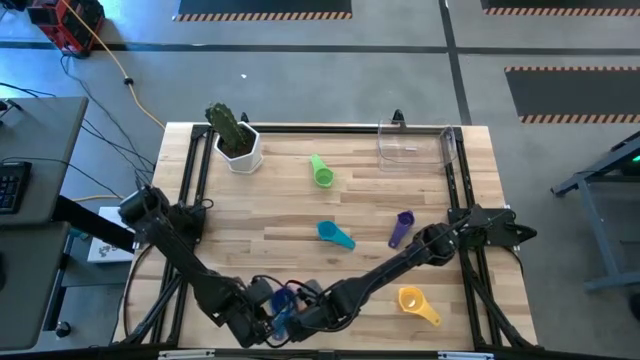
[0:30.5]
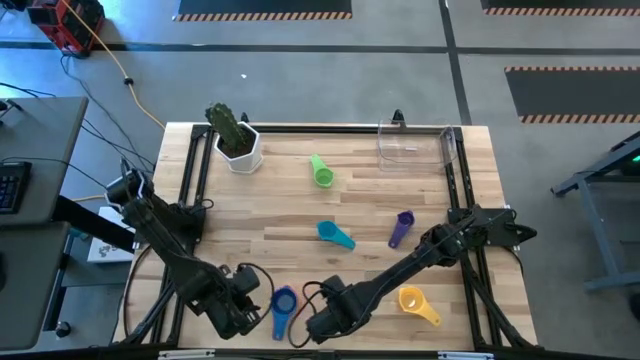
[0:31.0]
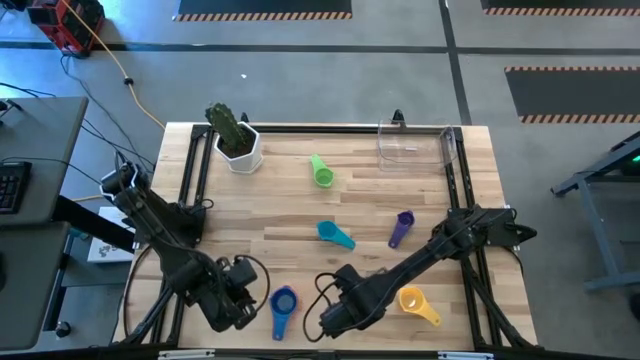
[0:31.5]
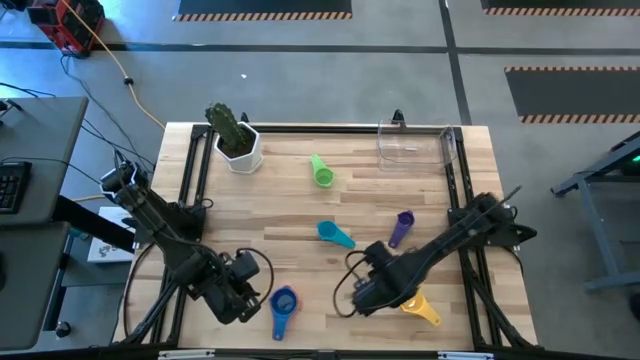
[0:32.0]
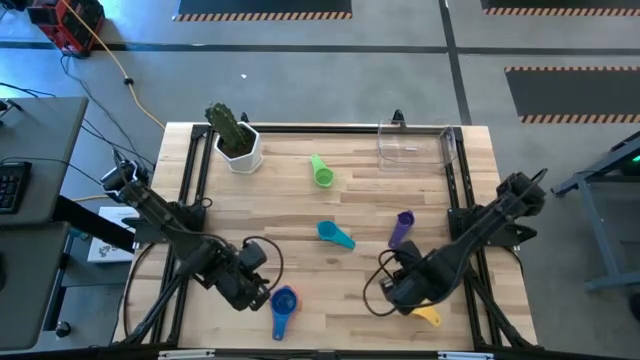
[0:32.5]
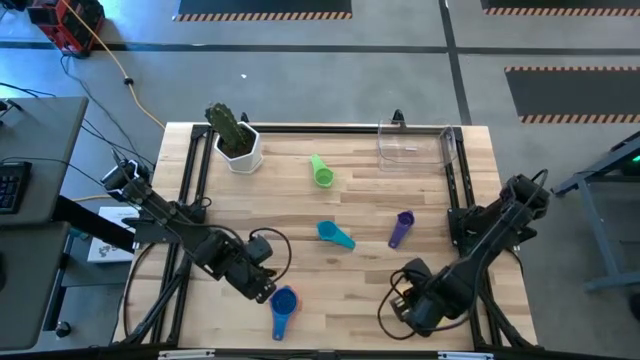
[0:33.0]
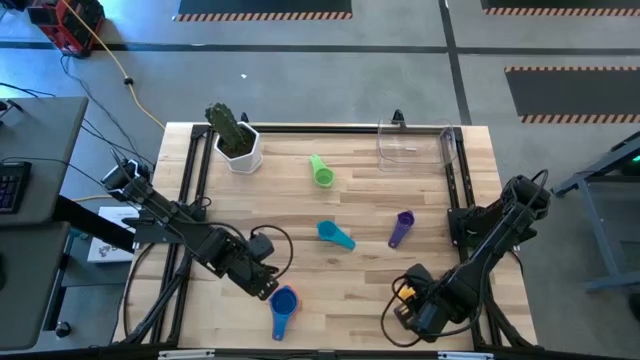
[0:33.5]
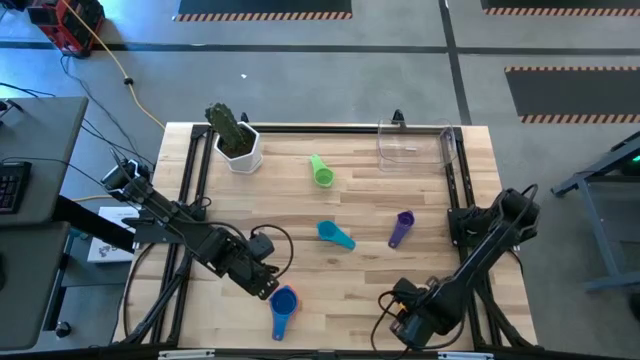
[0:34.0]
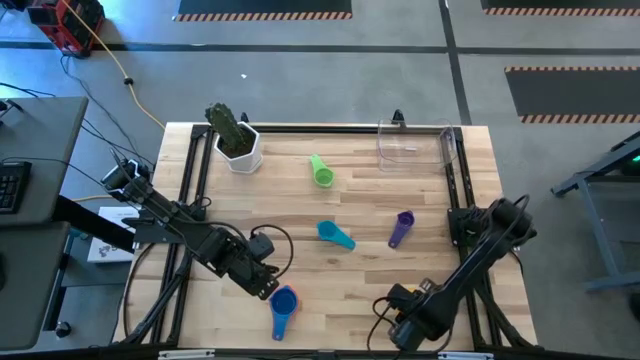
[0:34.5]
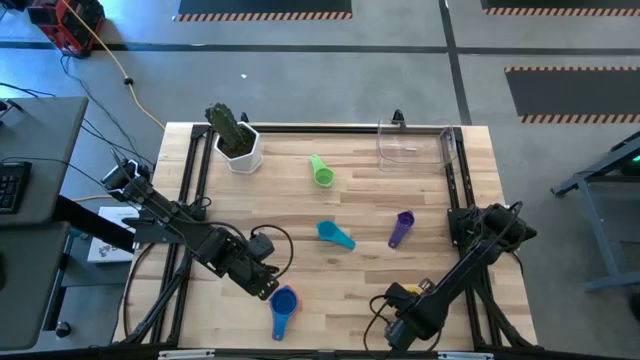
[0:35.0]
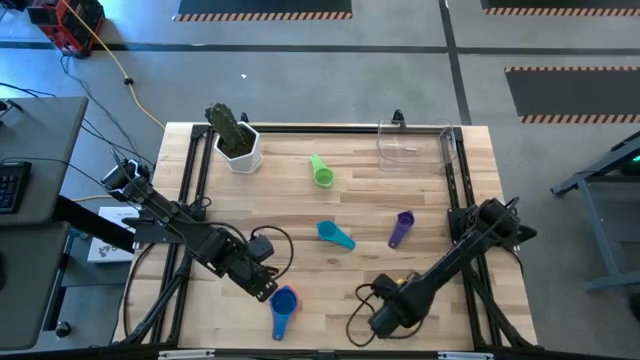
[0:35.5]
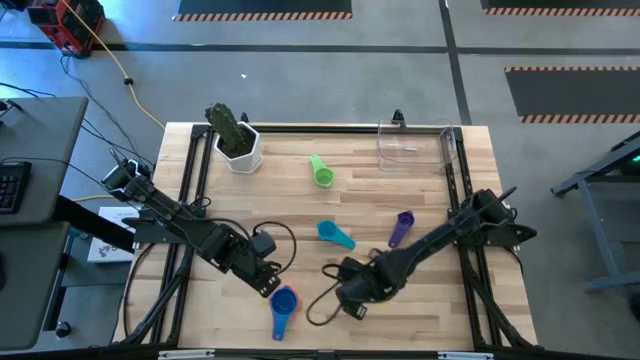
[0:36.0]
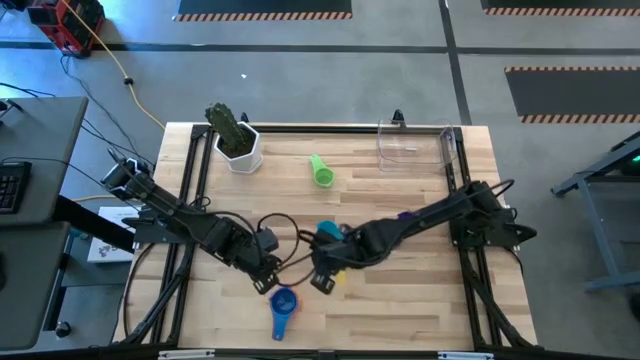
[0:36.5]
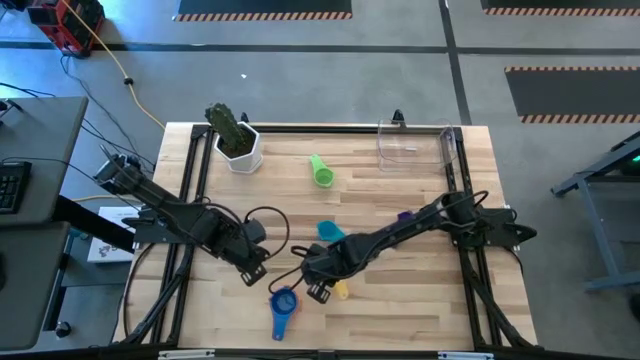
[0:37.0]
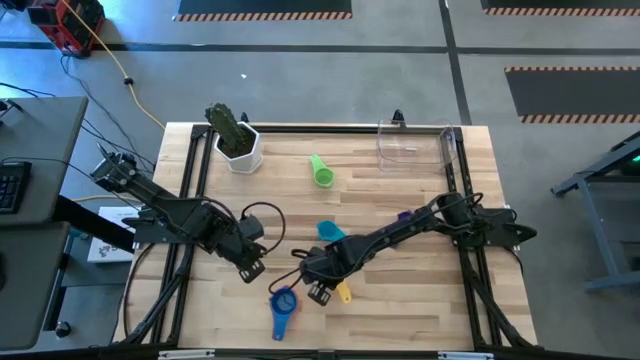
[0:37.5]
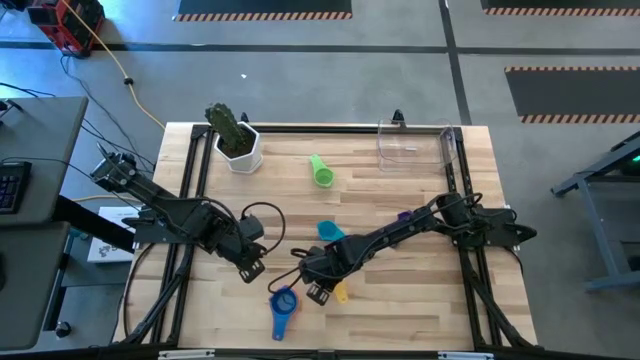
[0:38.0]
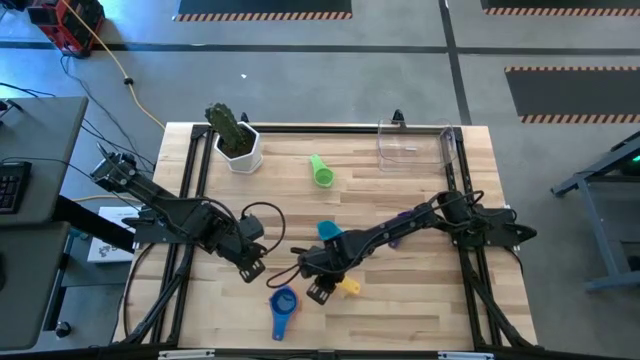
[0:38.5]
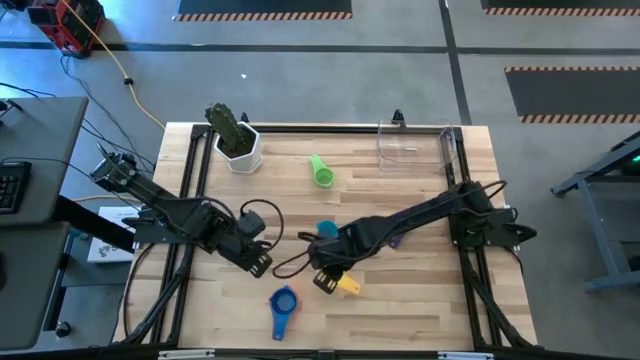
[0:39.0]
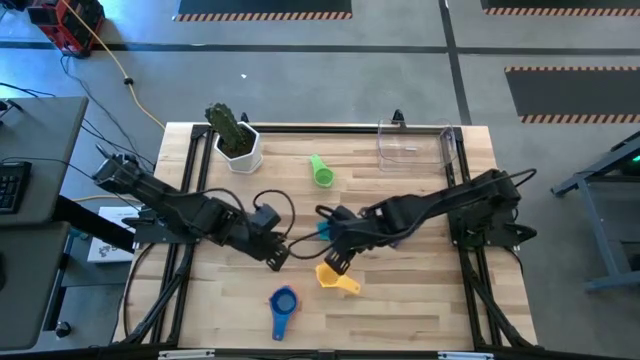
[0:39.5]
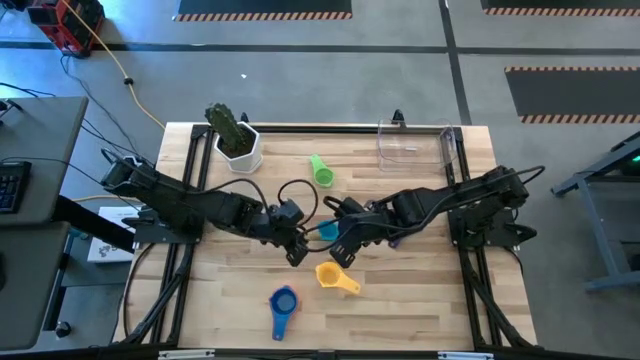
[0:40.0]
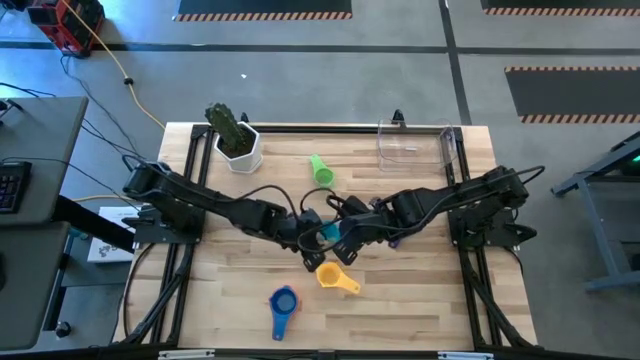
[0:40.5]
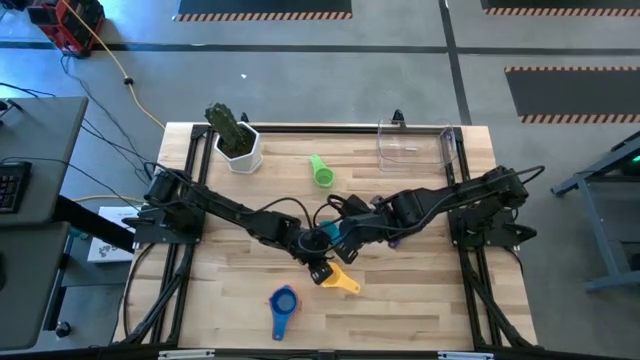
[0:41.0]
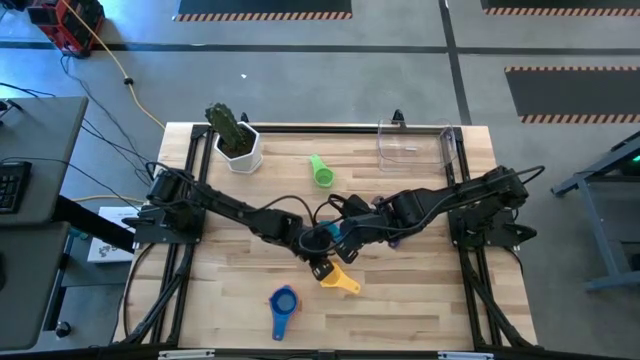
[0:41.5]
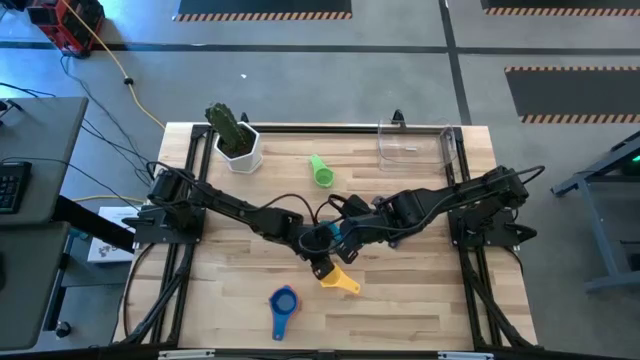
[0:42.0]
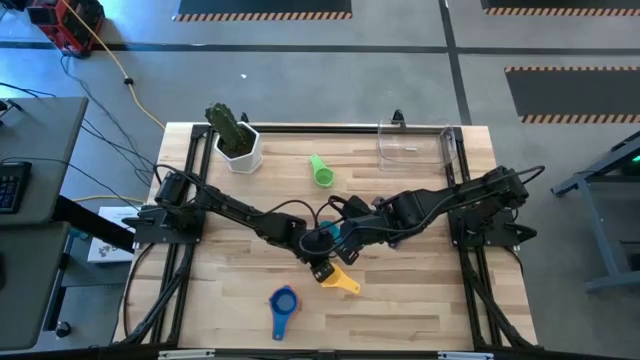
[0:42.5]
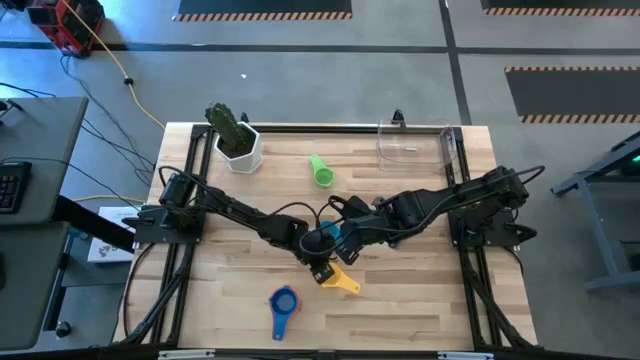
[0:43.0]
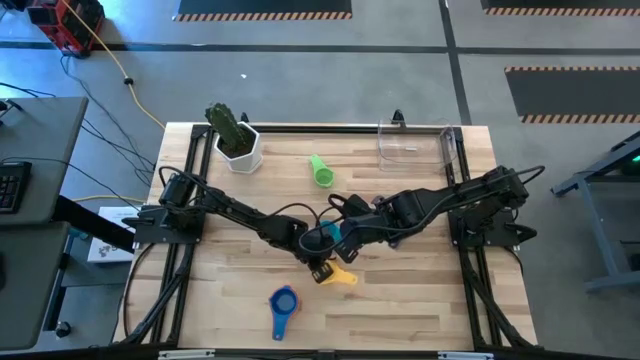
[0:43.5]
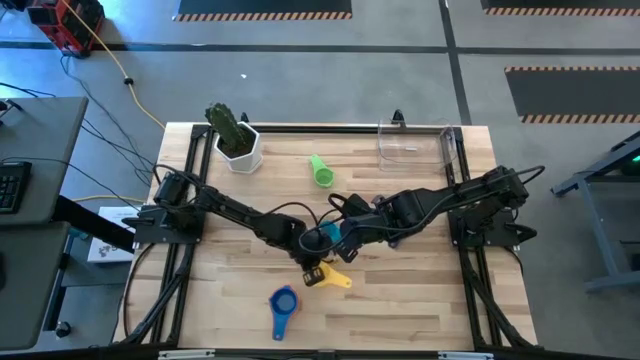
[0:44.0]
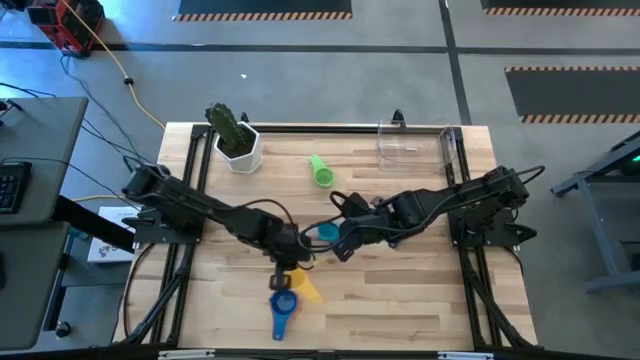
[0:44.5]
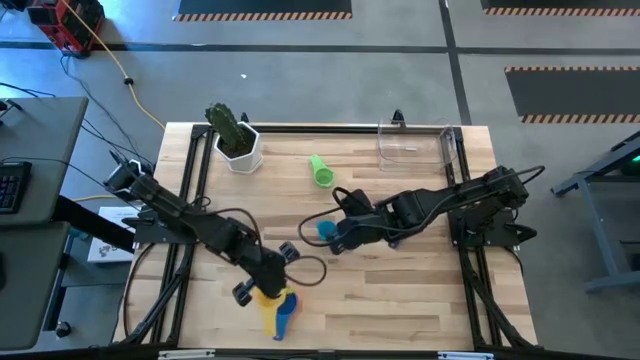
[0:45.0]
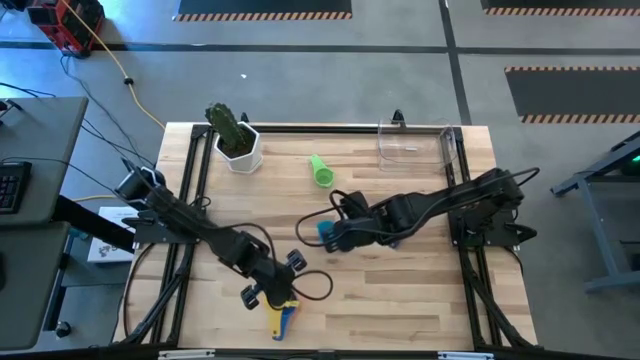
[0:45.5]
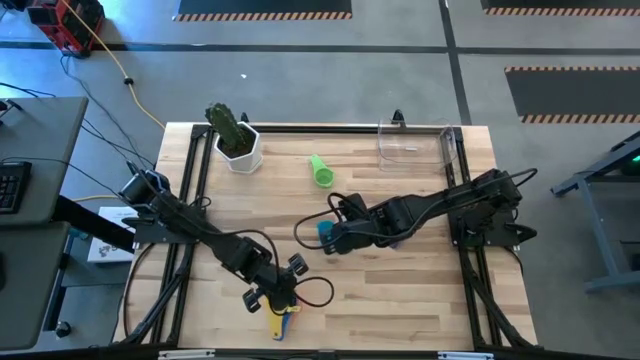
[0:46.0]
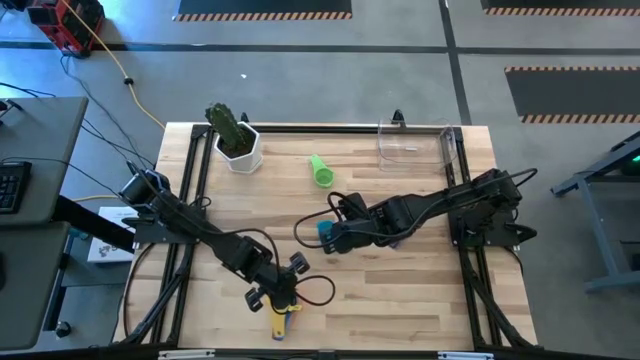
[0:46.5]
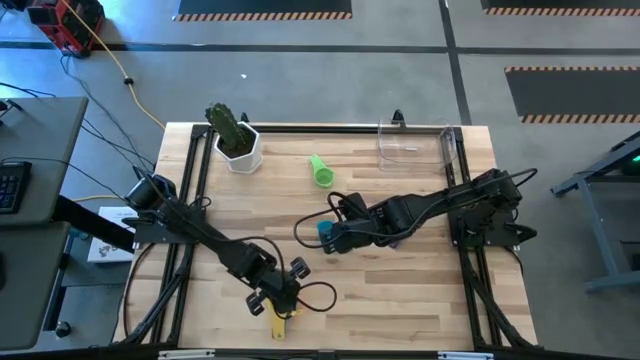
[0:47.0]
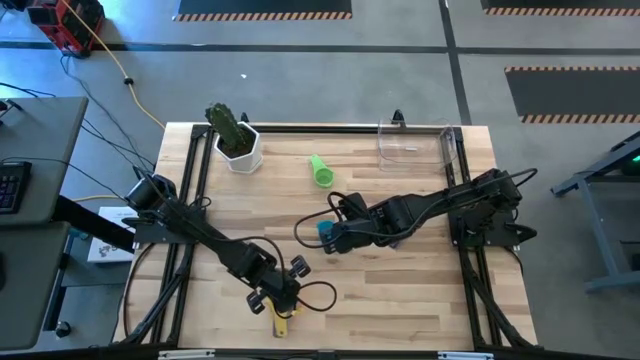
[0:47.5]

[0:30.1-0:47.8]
Task: Nest measuring cups in basket
Stack the yellow measuring cup on the blue measuring cup

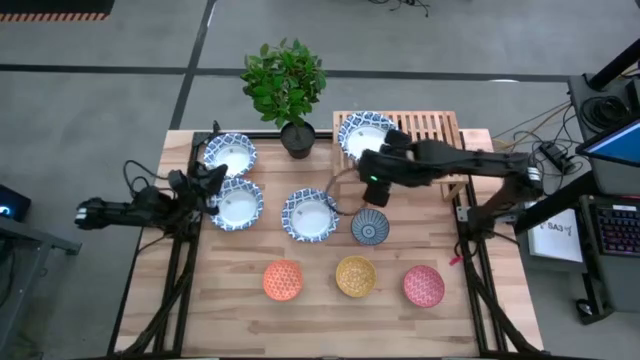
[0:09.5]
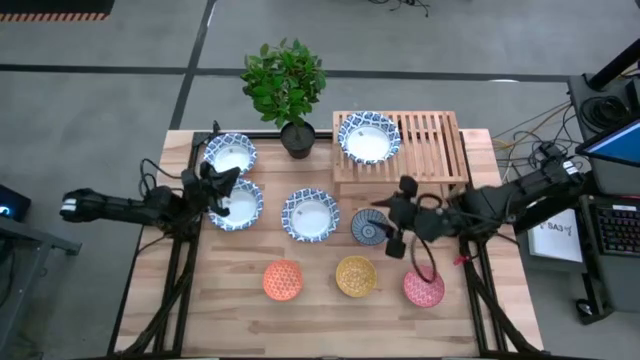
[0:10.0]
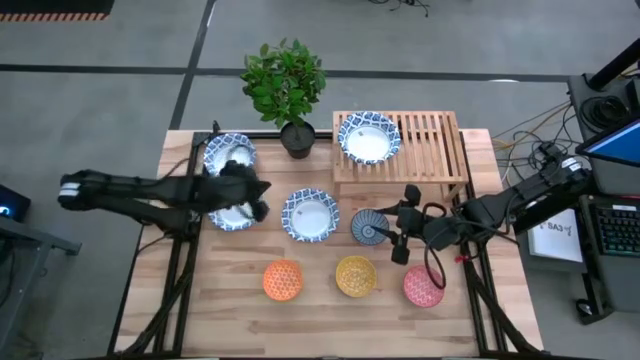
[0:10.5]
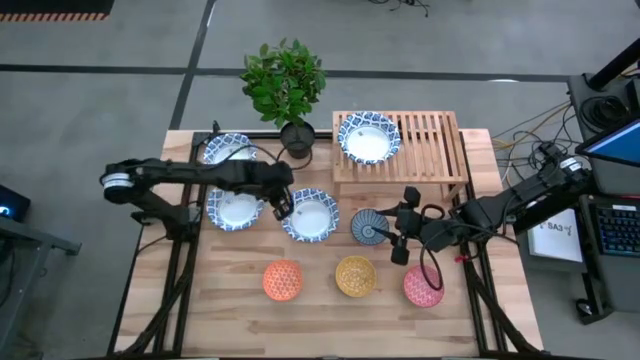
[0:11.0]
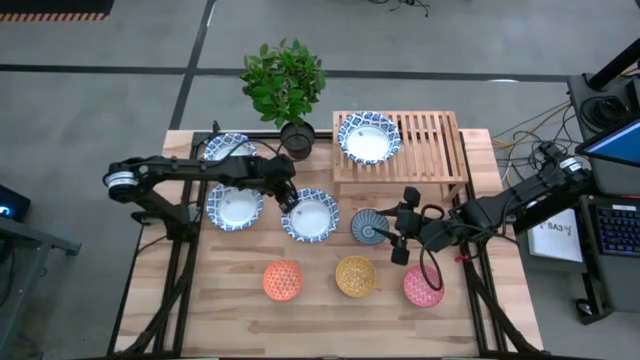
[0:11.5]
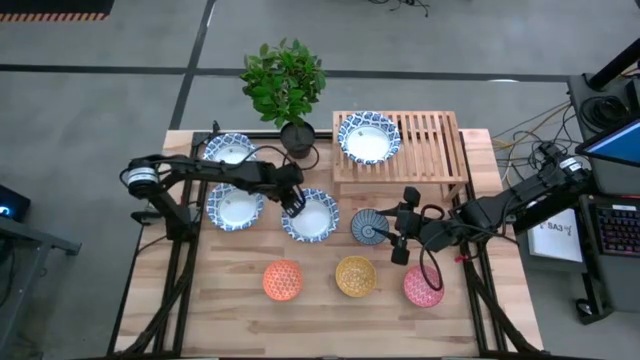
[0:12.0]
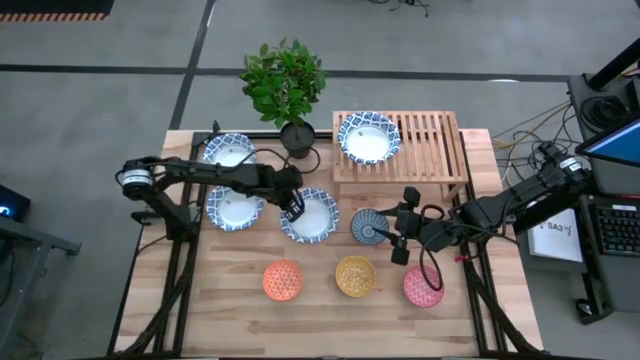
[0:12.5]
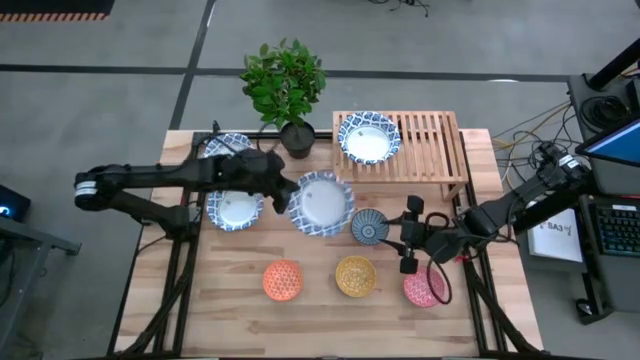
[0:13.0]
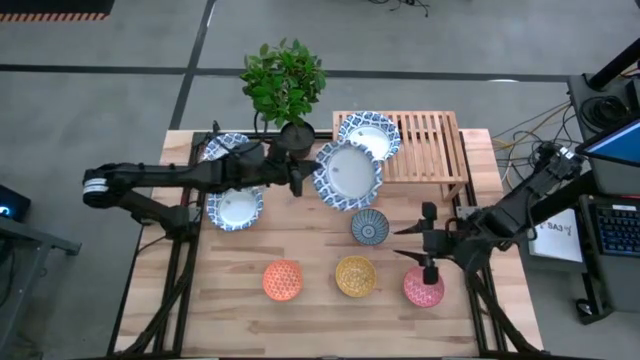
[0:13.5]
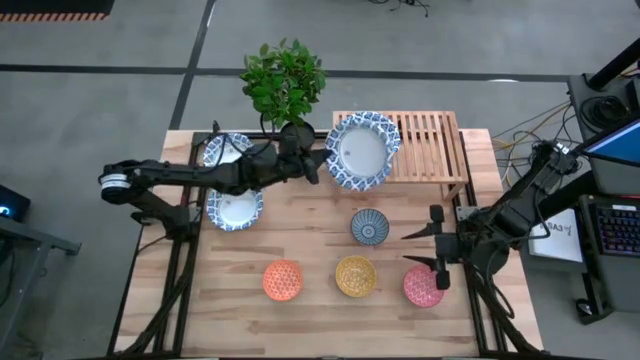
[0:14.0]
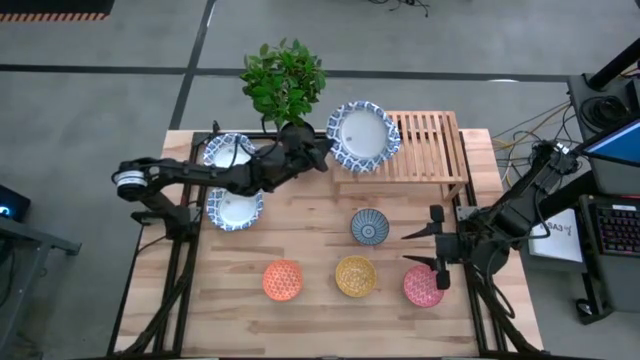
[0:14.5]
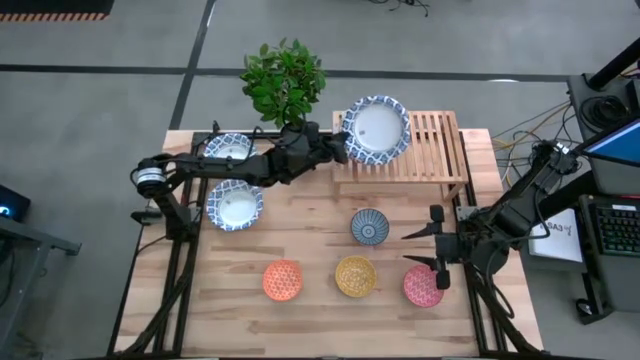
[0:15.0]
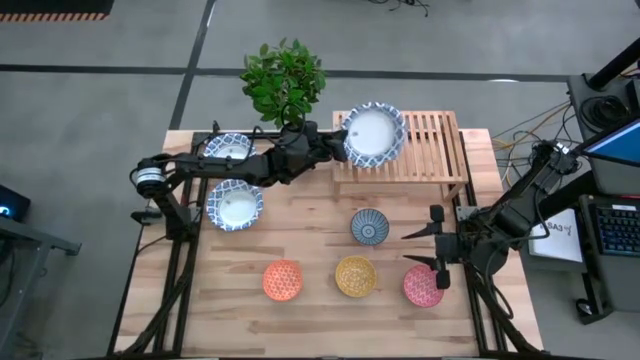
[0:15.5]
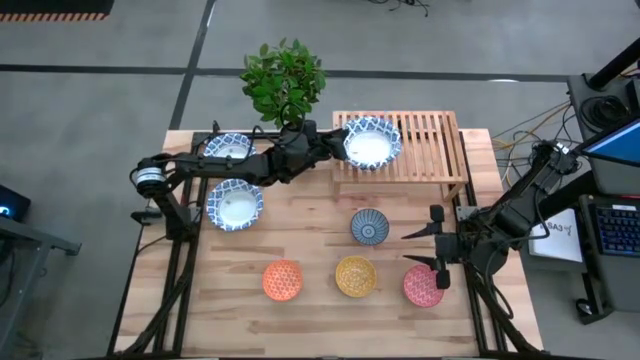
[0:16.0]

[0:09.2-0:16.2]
Task: Place and stack bowls onto a shelf
Stack the white bowl on top of the white bowl on the shelf
